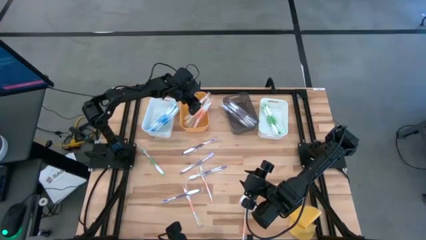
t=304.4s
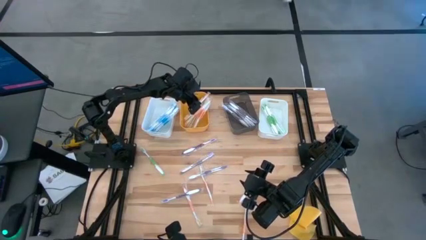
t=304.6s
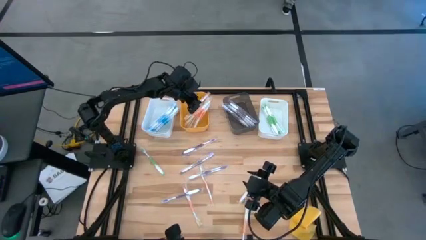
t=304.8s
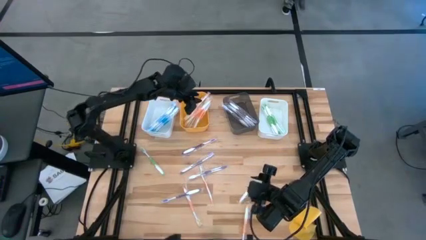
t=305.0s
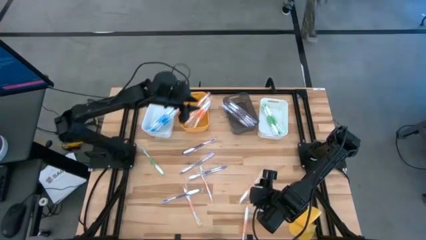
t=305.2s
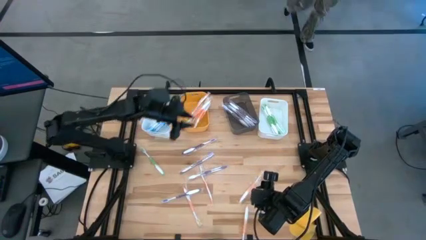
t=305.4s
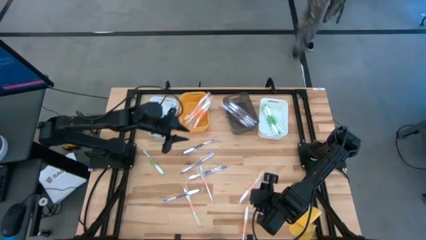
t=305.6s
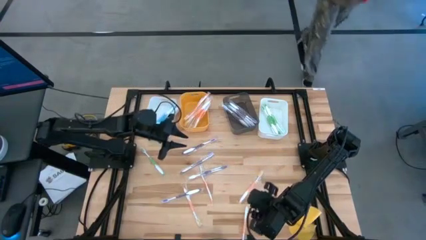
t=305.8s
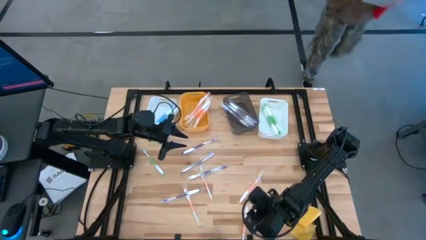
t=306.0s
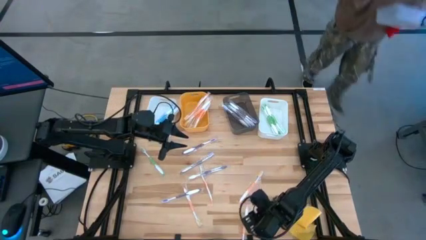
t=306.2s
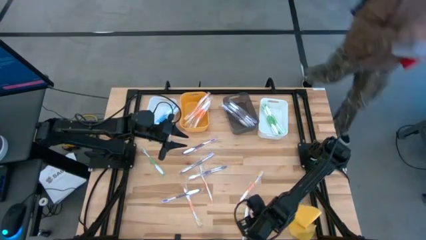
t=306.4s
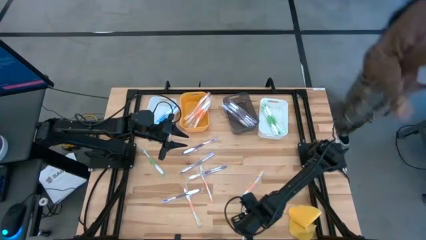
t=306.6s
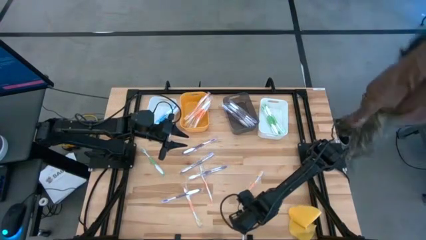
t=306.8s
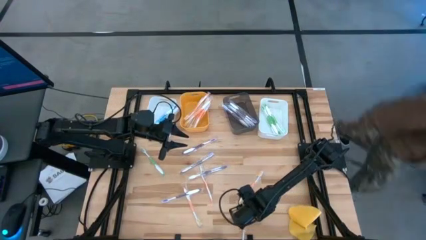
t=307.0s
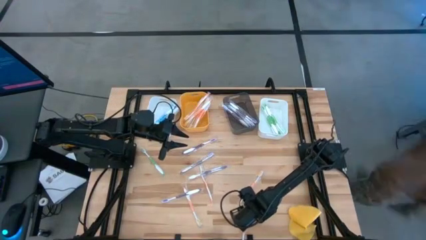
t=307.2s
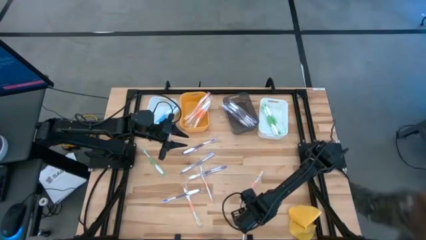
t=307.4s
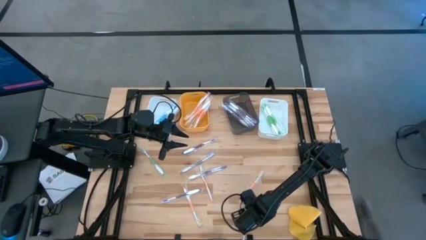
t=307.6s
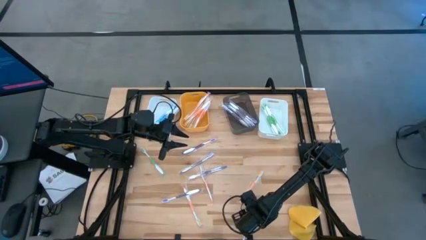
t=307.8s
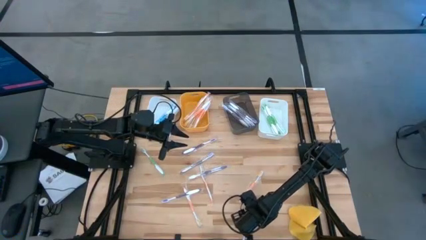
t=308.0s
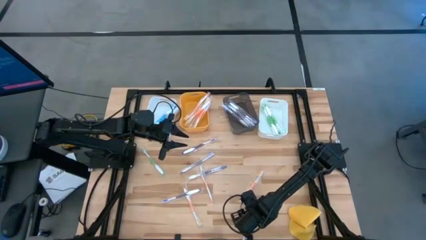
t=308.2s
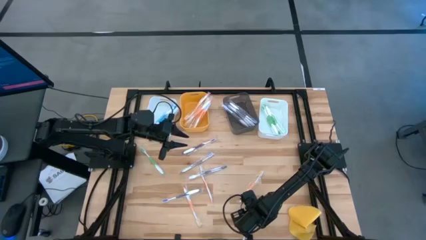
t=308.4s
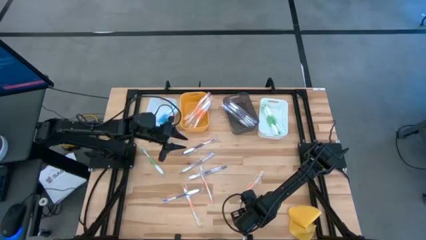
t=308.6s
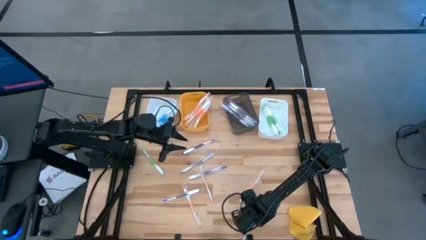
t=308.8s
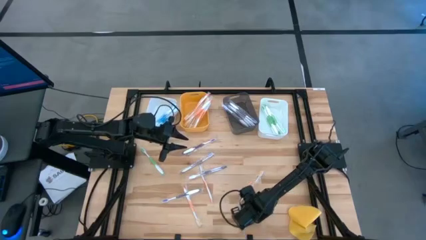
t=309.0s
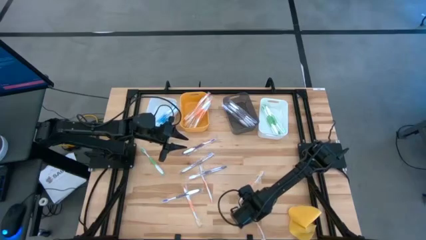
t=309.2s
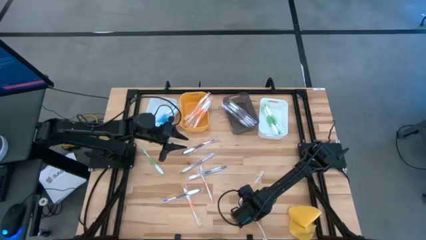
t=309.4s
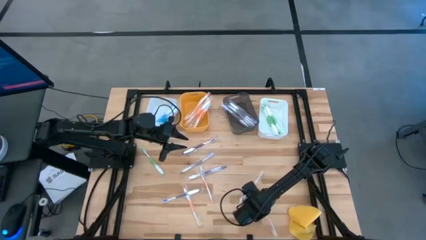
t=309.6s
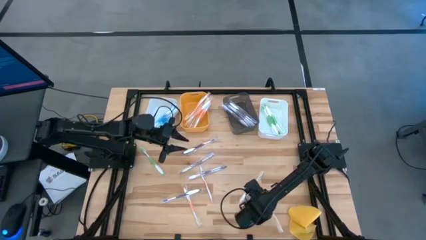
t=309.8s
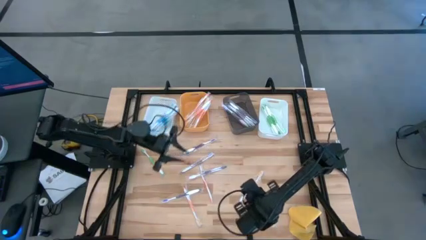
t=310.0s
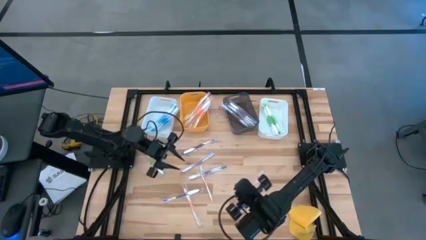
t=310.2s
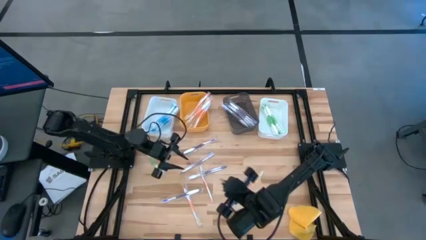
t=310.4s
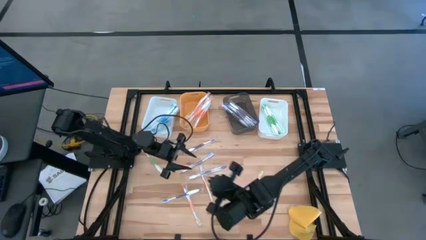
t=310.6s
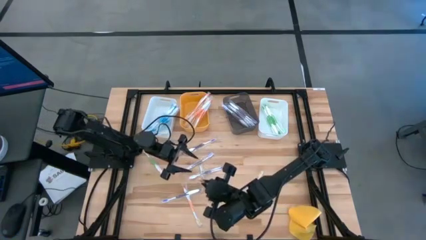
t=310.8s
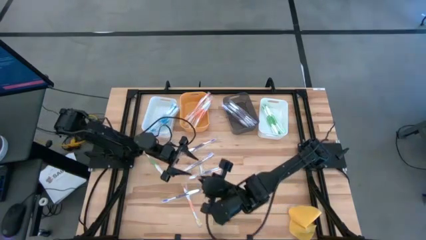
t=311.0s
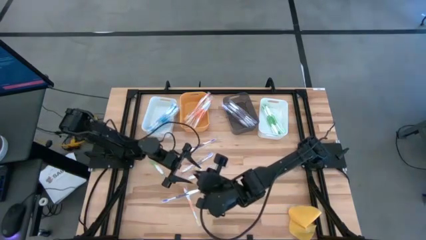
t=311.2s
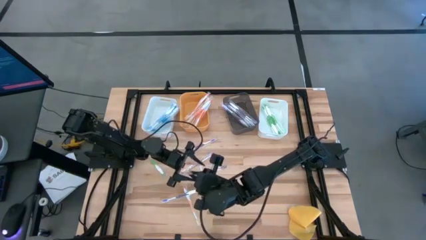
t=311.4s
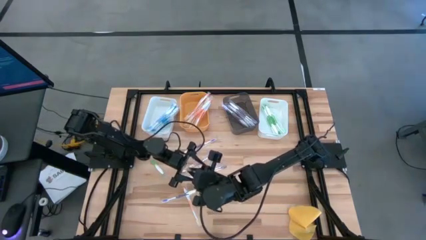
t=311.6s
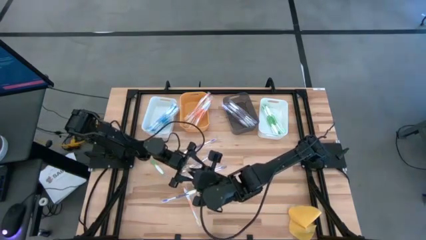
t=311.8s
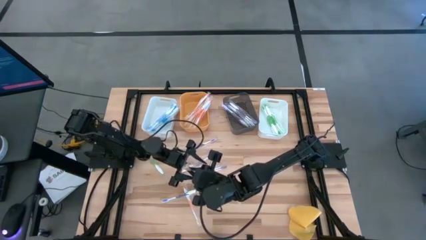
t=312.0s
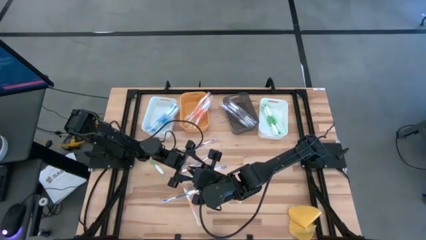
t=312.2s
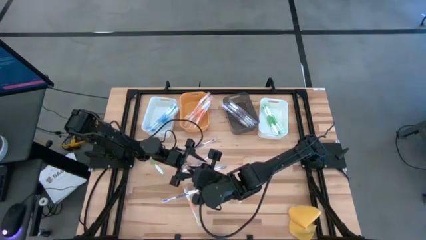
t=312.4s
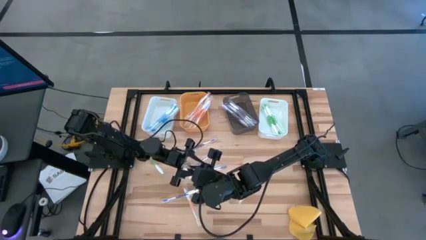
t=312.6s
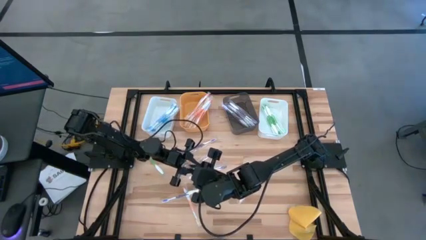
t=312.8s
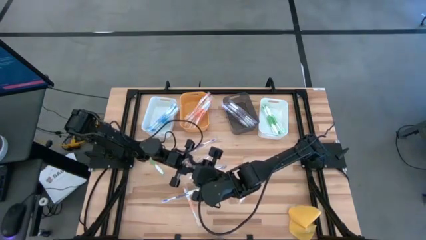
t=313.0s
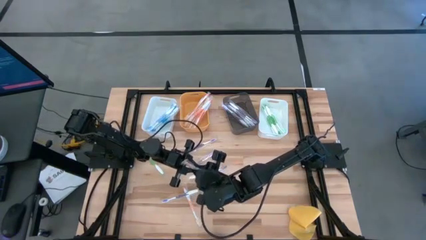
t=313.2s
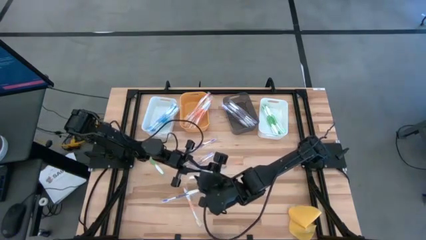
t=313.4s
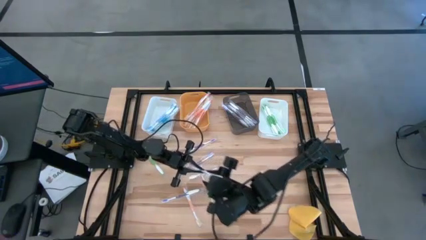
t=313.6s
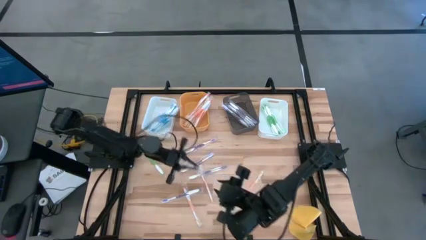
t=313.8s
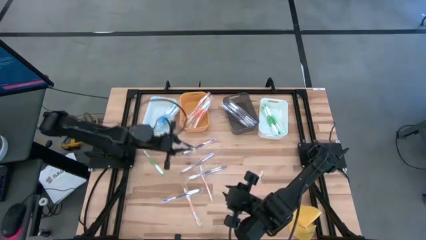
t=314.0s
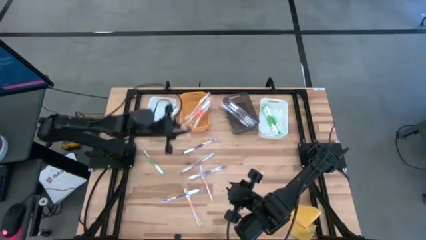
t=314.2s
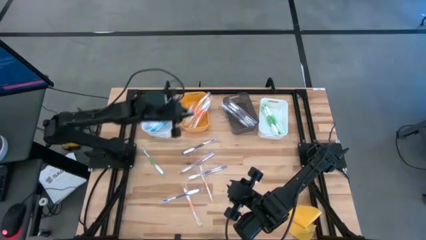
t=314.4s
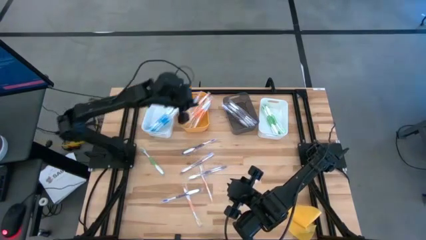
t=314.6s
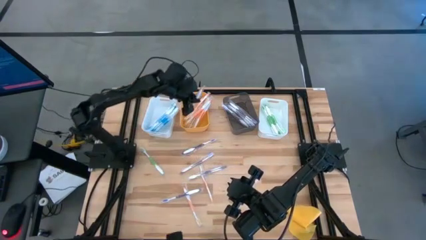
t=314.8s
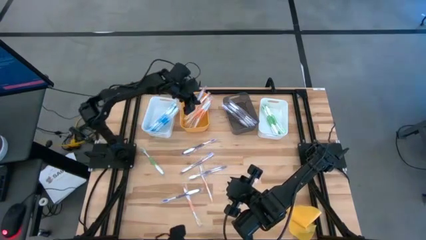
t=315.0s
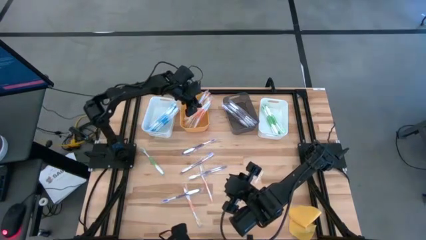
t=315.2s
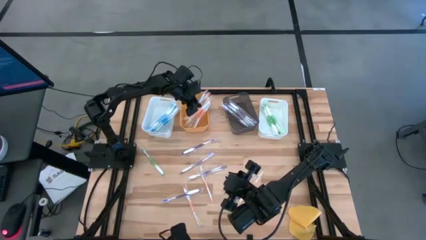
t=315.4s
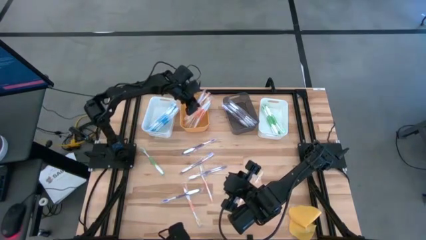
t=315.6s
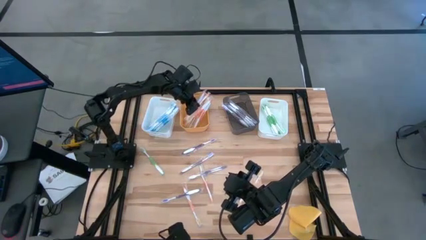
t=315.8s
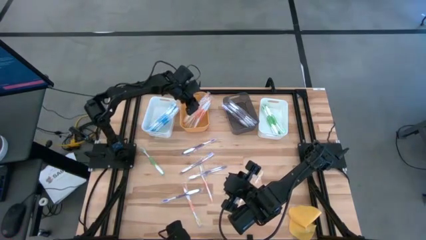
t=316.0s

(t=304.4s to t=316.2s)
Task: Pick & Place Toothbrushes
Put the orange toothbrush into the yellow bin

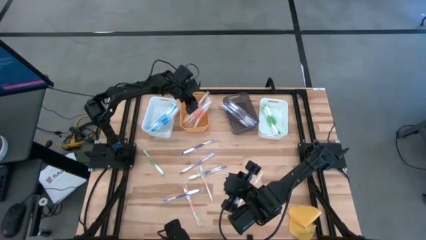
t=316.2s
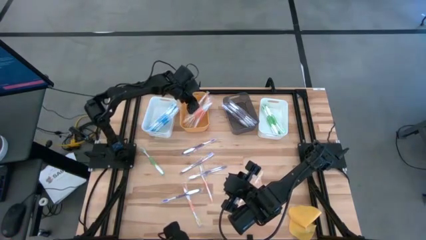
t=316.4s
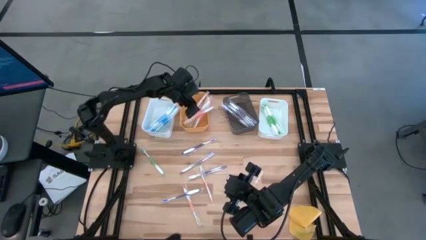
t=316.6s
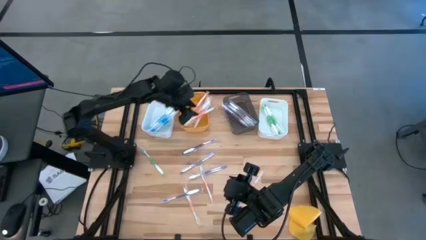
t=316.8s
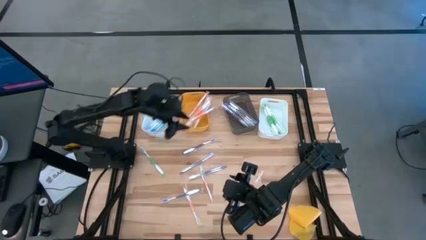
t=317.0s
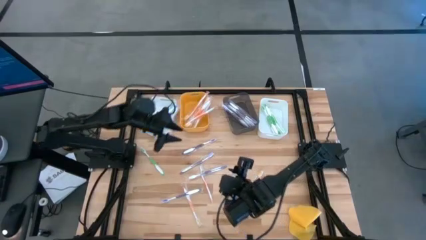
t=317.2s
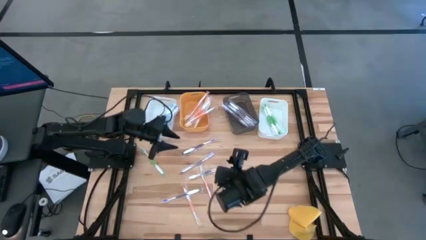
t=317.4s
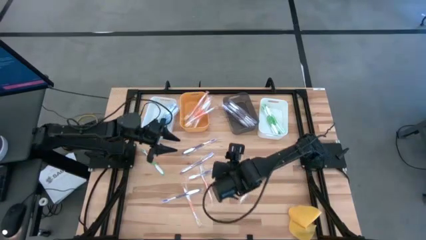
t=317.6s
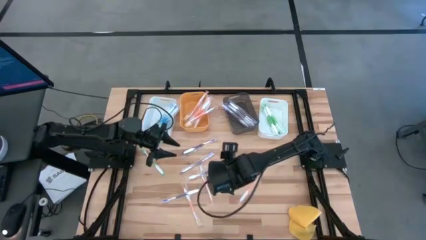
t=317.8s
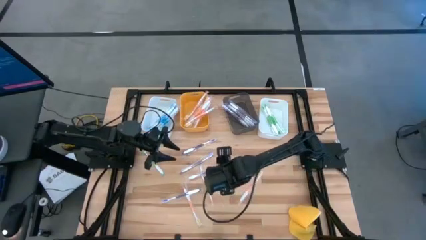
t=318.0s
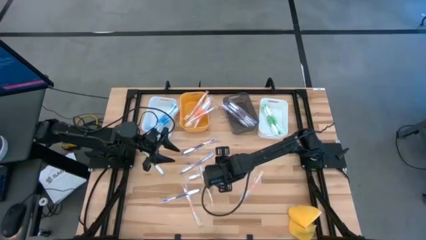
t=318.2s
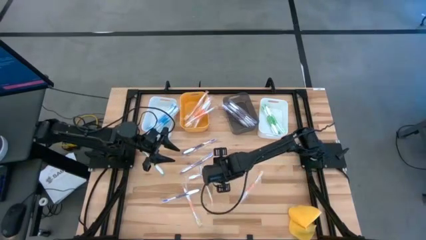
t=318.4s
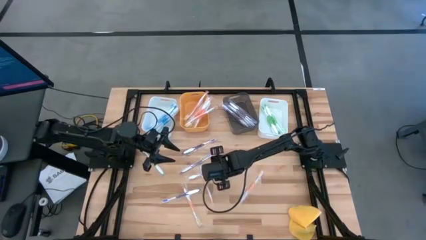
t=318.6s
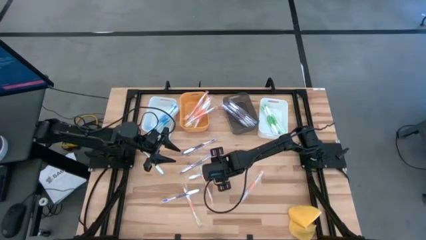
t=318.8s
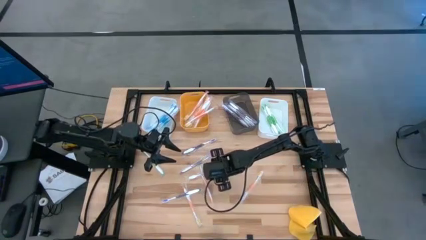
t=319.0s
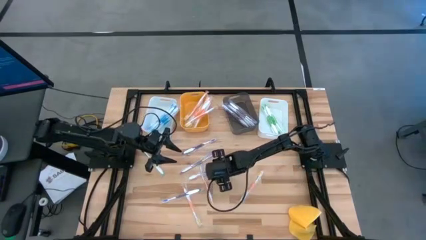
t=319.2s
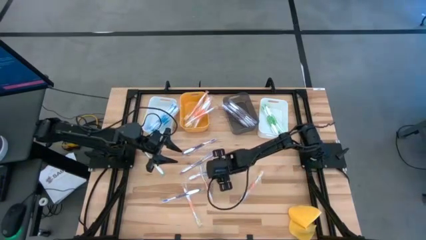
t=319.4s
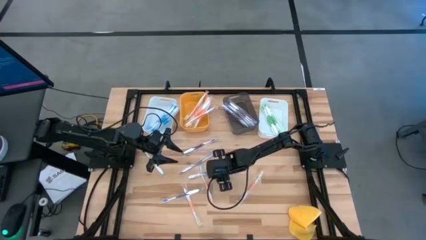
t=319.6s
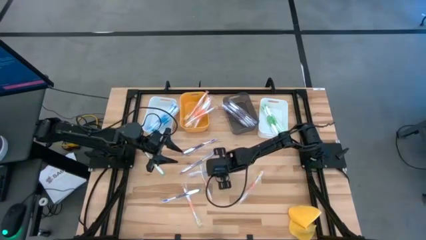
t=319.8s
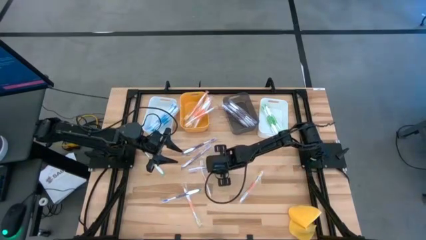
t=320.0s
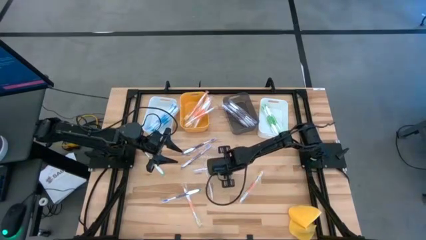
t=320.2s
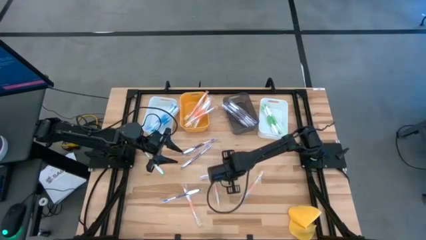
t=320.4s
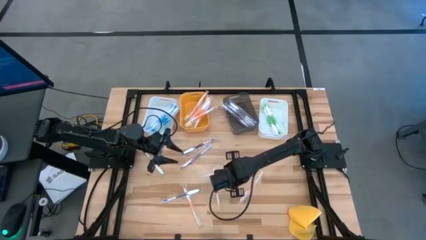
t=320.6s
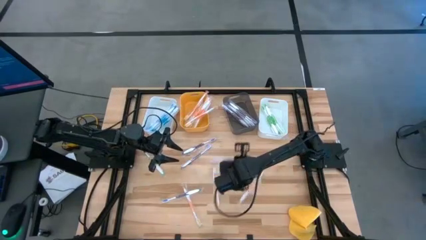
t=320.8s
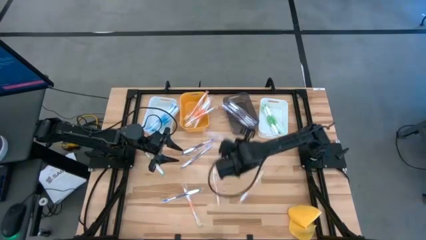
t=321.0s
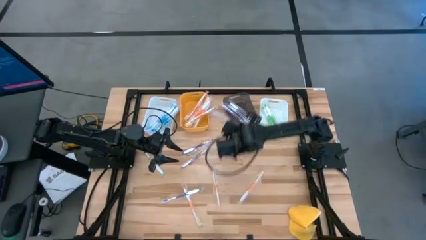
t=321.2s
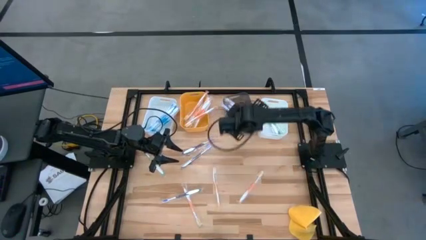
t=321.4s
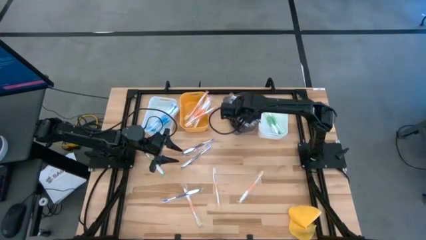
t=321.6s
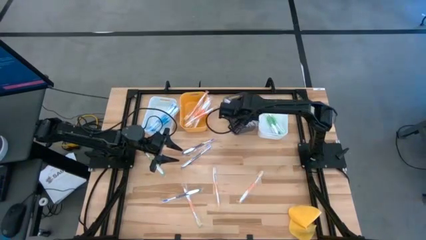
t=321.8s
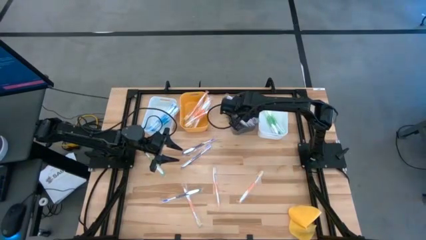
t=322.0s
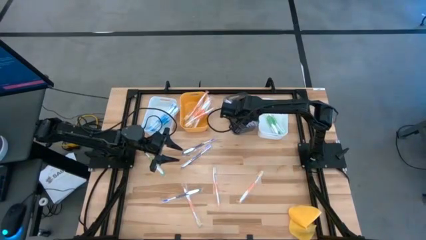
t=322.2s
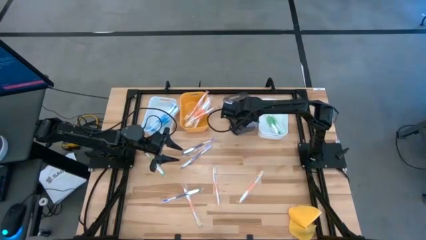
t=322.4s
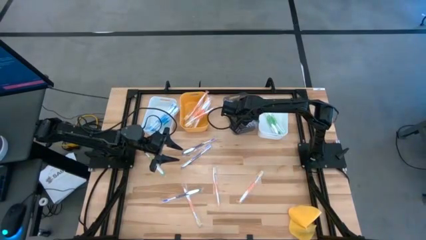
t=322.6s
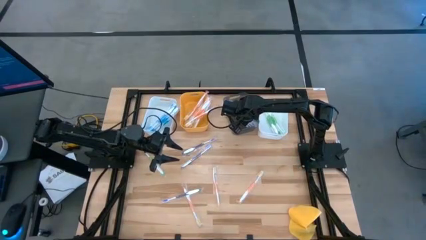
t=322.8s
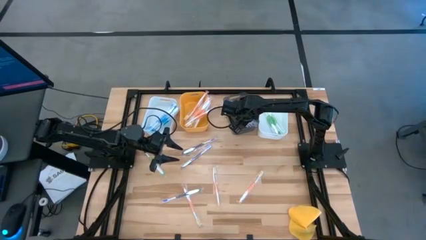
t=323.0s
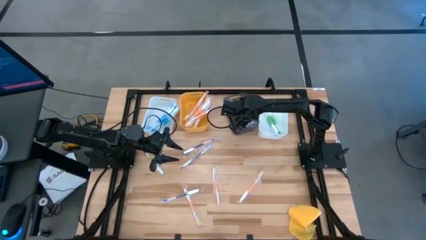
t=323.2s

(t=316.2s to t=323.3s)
Put the violet toothbrush into the gray bin
